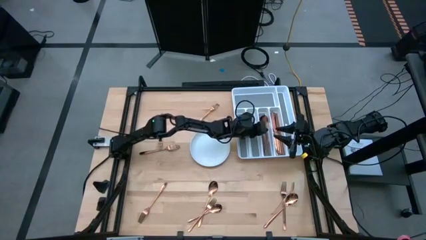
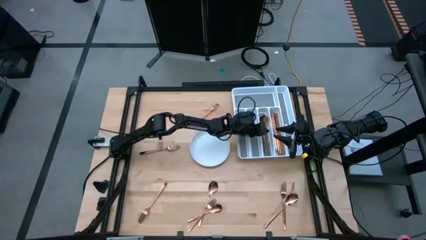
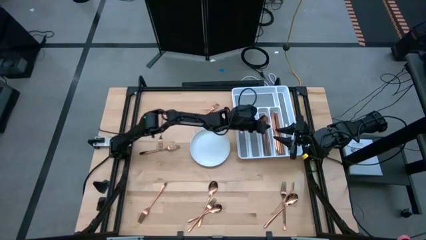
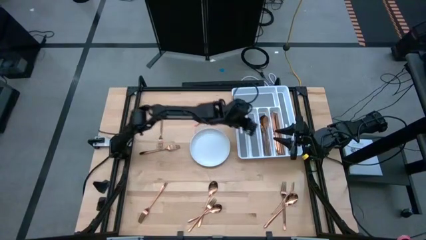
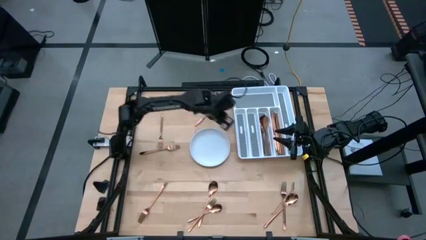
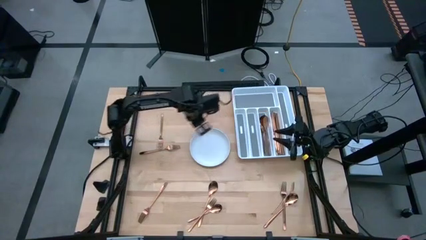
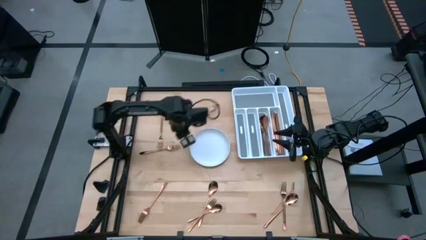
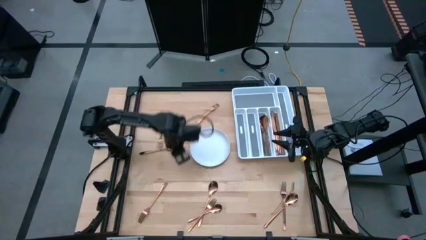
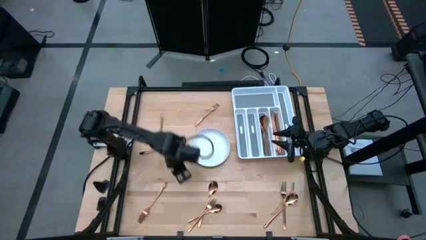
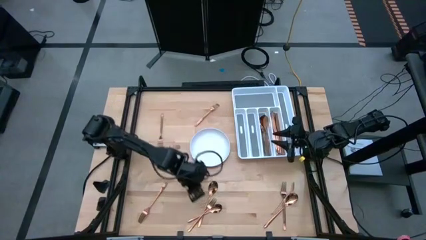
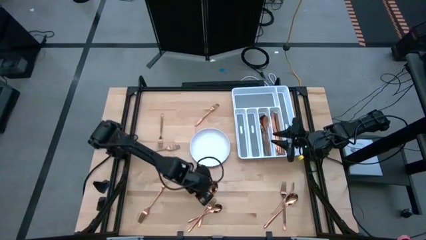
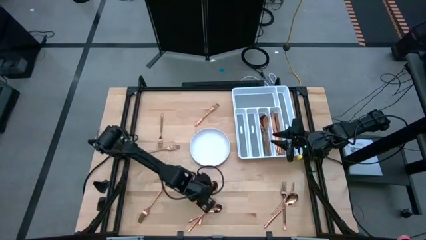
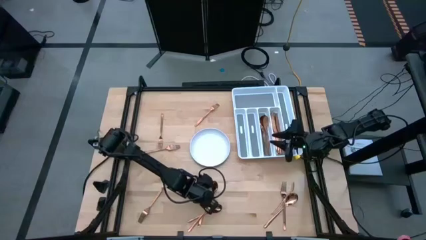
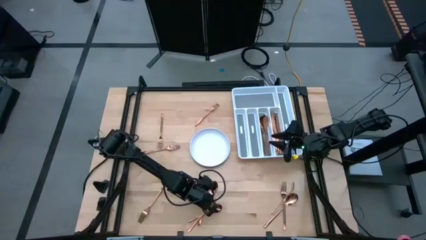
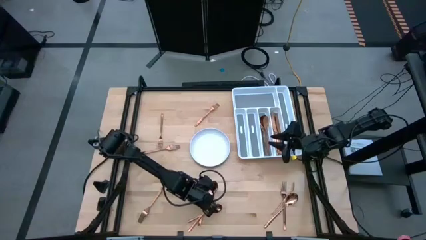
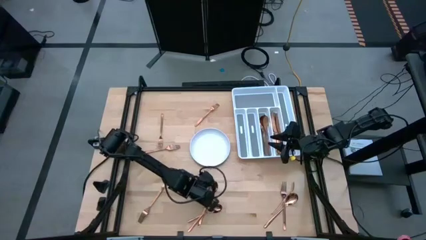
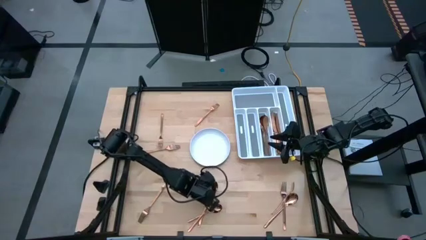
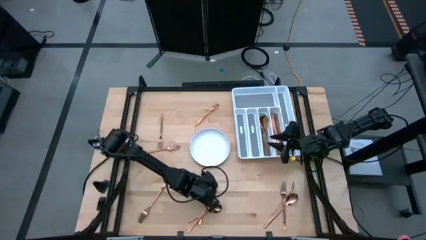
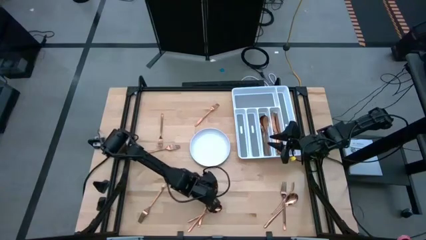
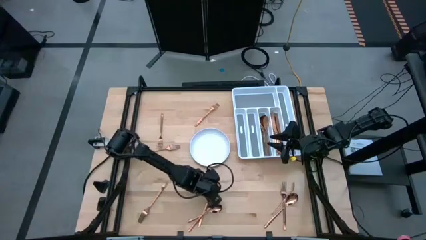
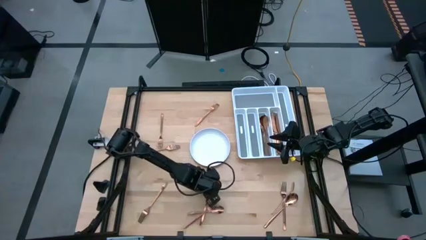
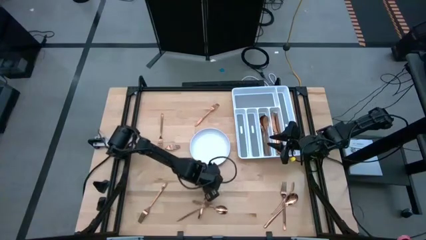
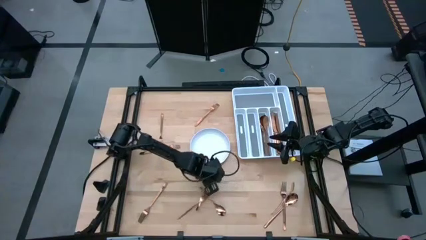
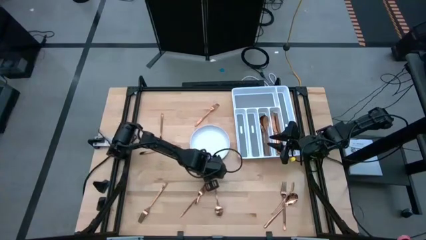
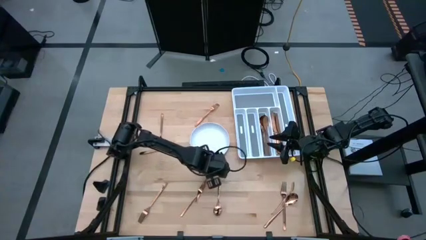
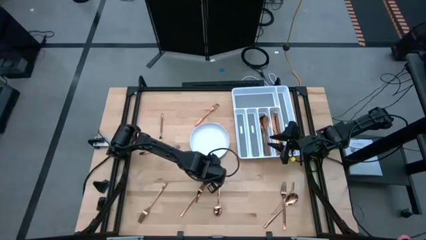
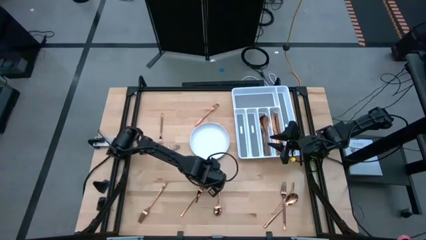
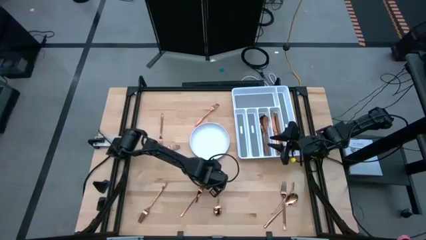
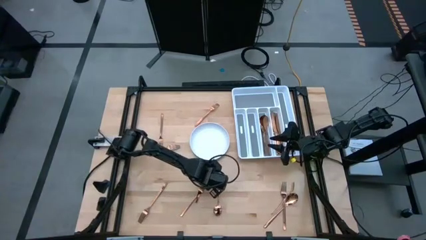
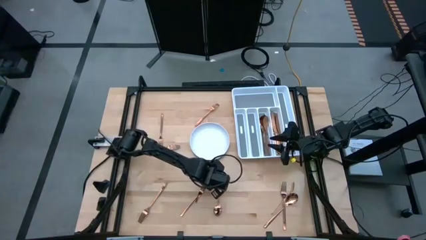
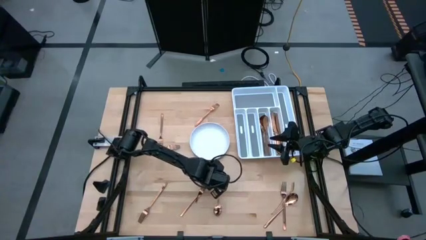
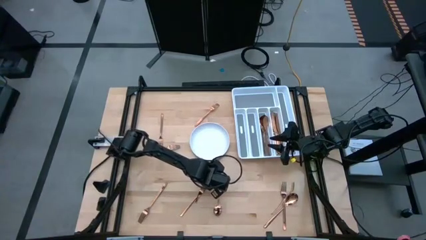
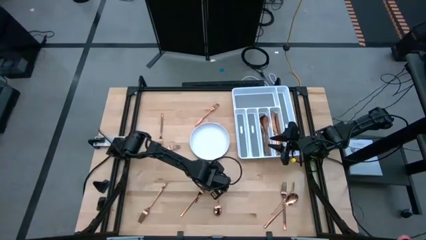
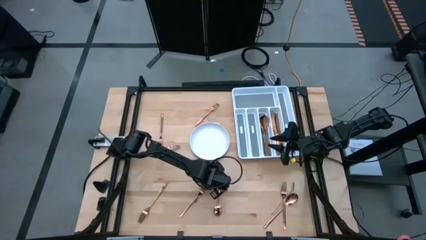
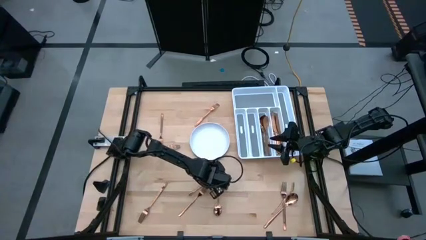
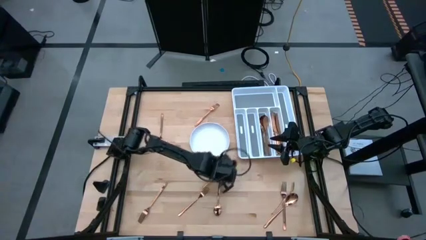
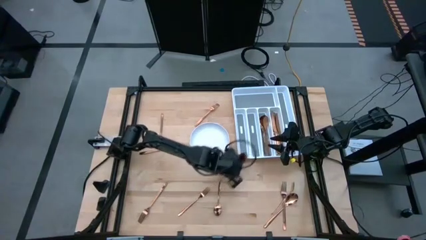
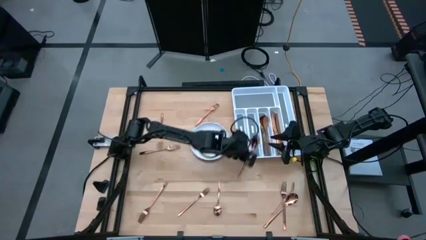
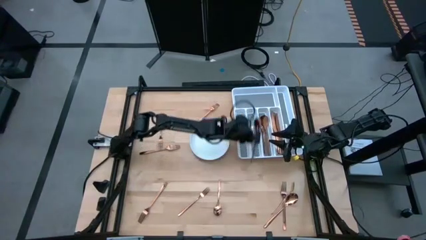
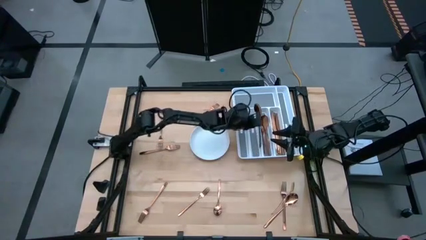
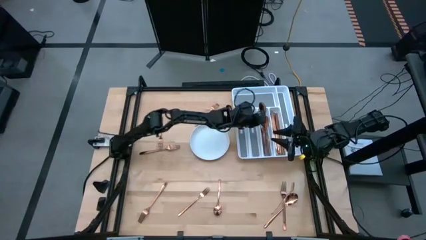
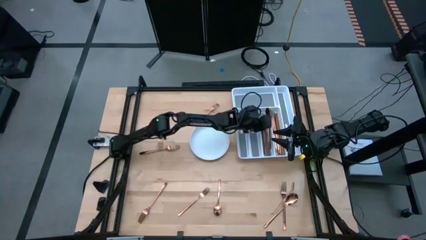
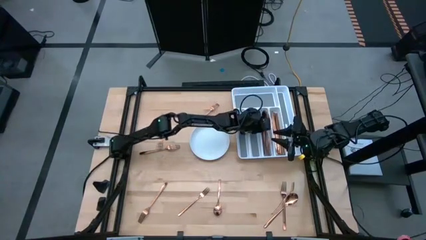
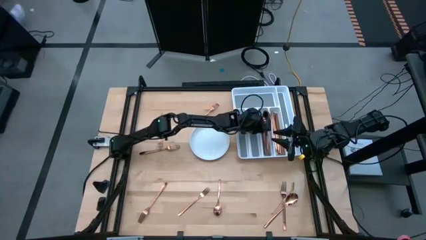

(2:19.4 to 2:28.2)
Task: Sort silverware
Put the spoon in the silverware tray

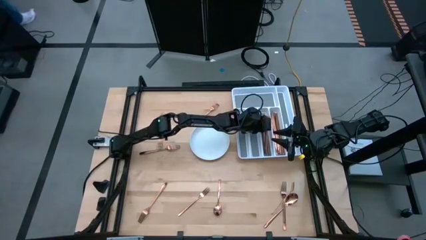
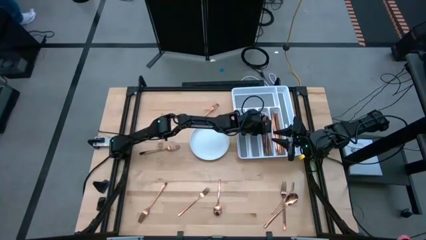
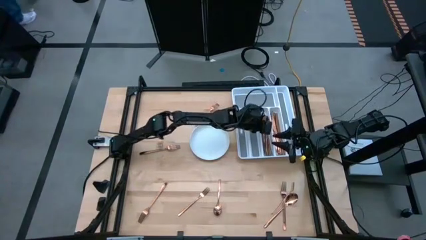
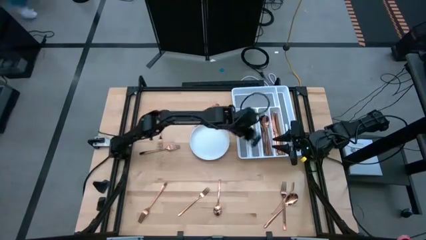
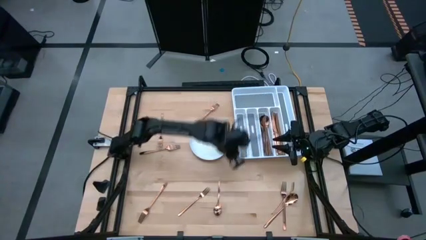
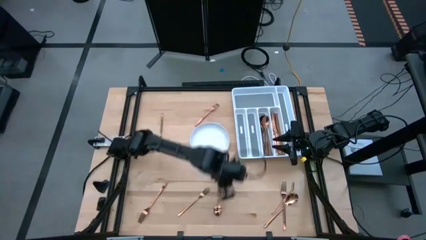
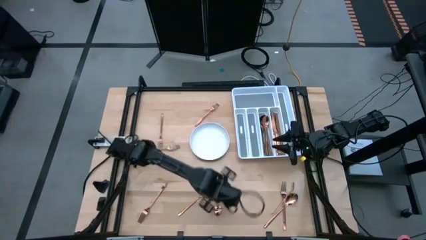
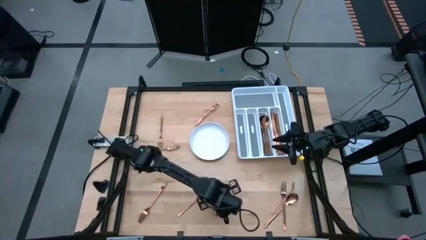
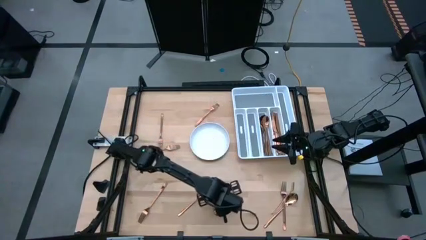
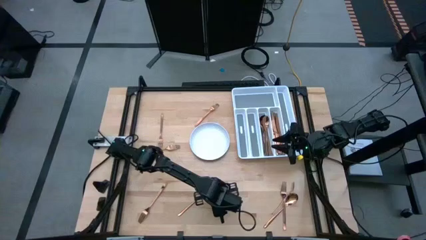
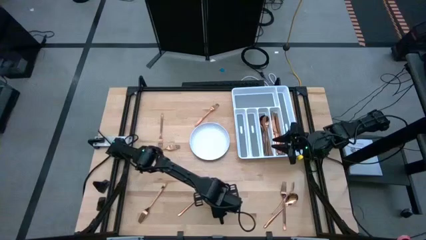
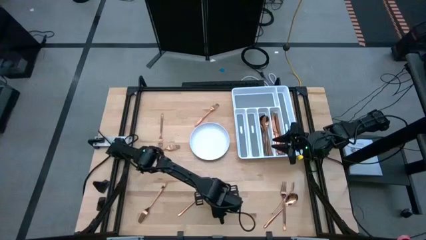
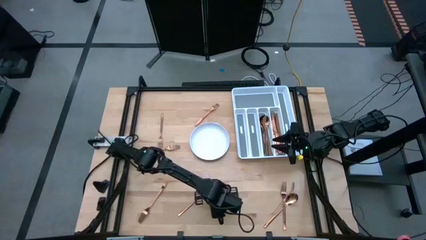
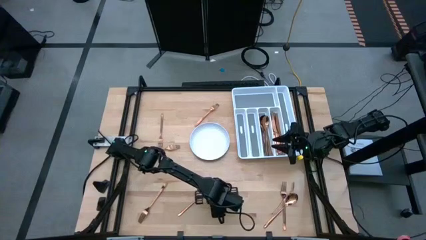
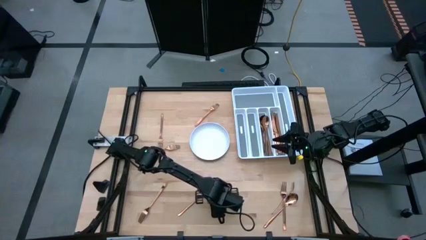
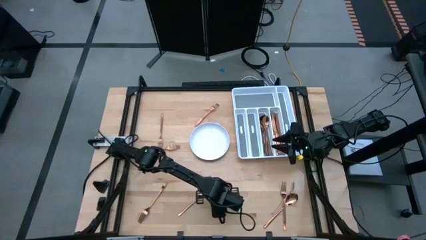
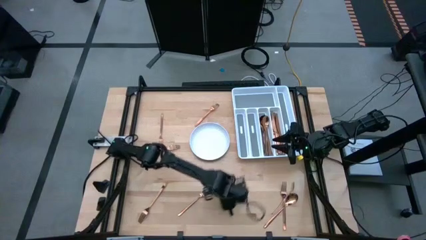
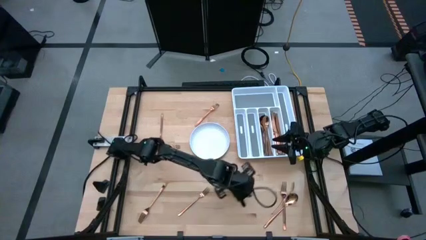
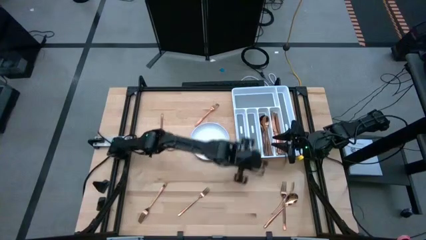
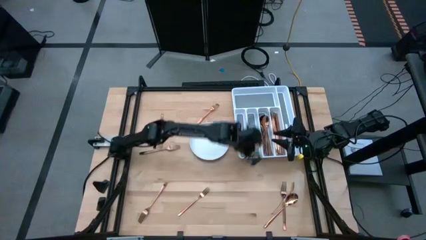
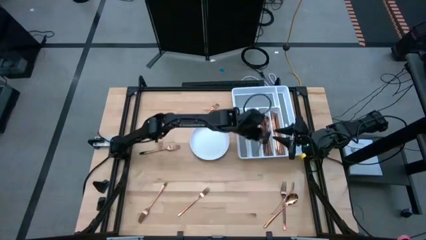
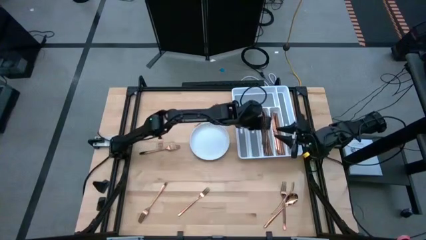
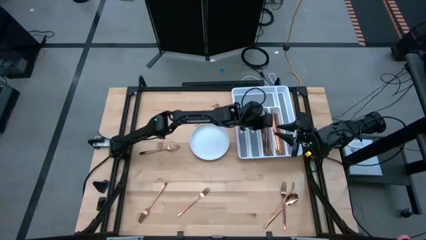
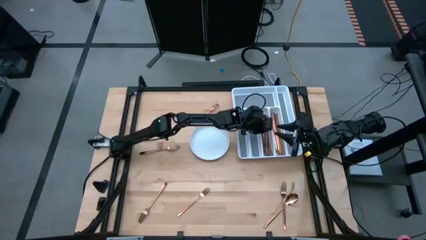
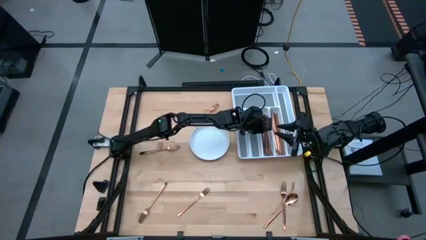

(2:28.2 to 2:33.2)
Put the spoon in the silverware tray

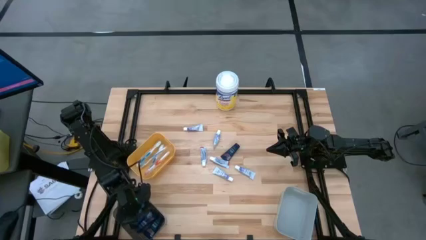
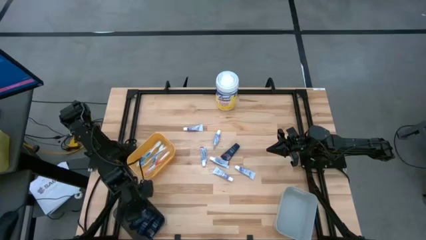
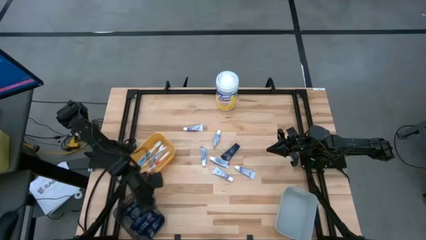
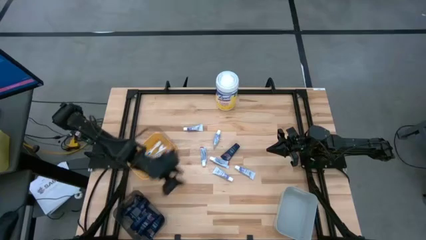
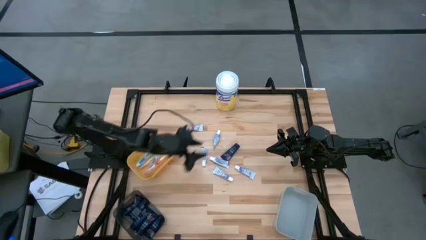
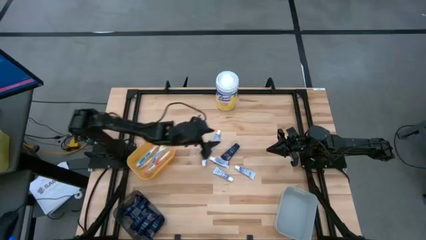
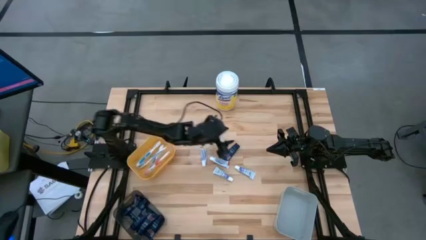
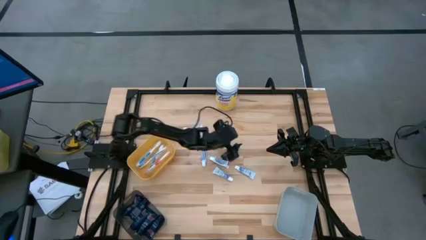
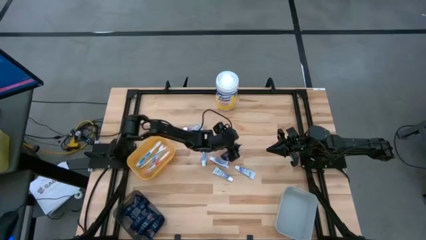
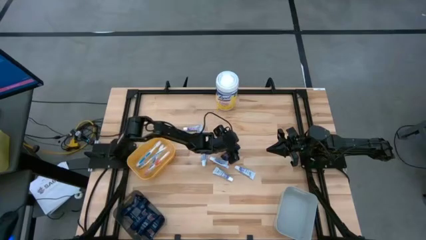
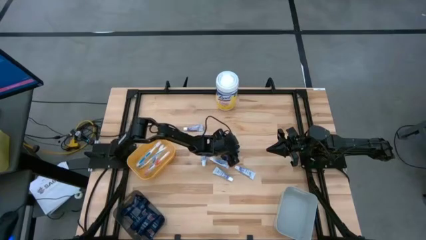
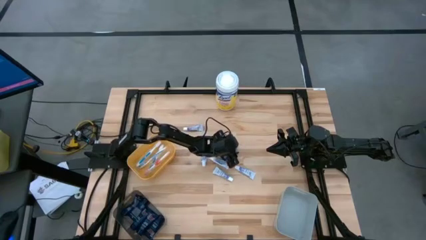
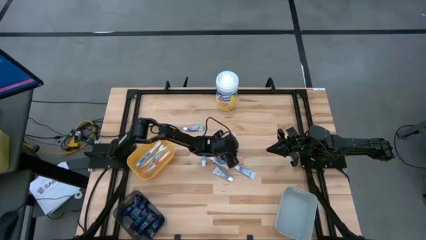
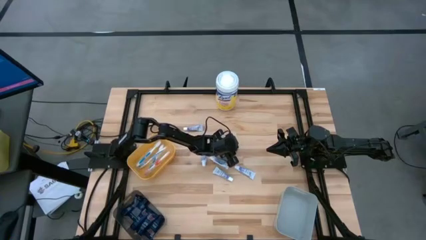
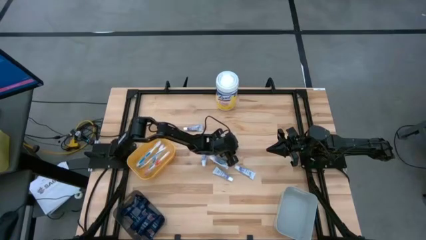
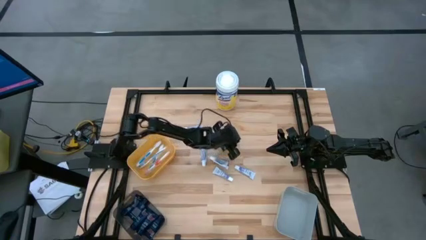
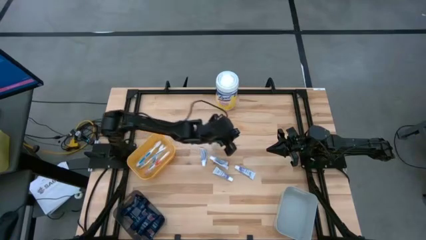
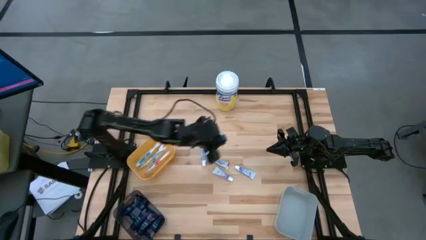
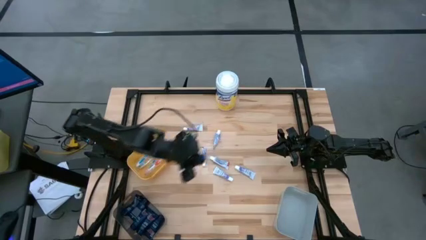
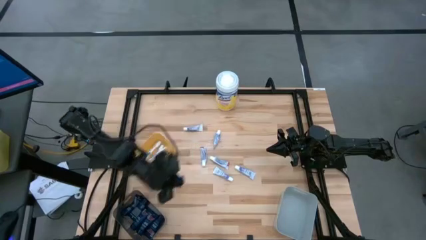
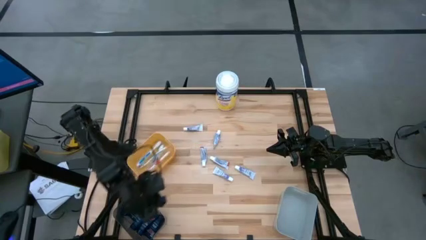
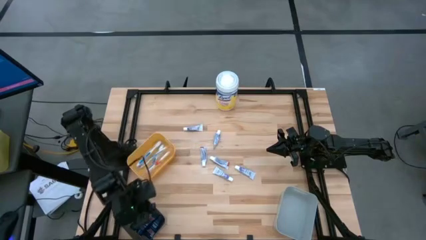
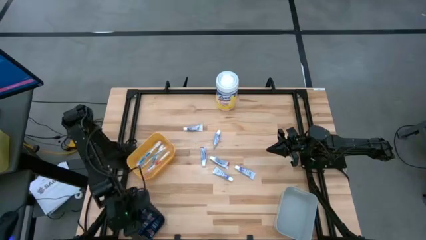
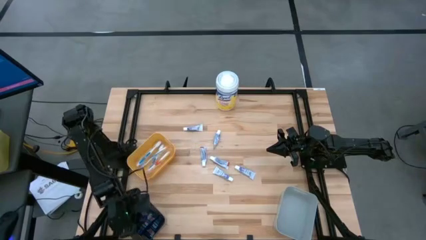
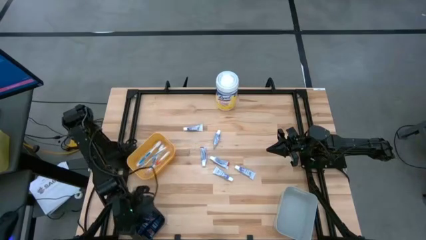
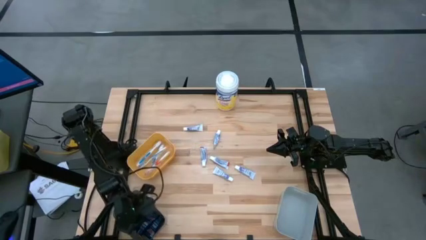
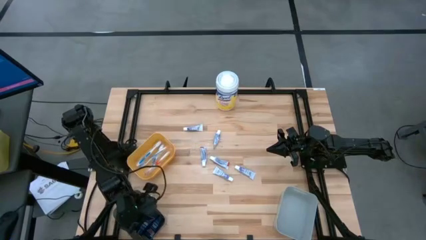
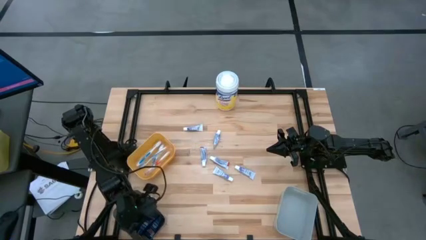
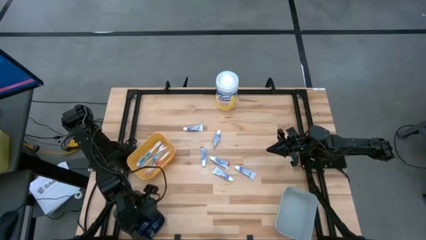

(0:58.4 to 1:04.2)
Task: Pick & Place Travel size toiletries
Put the blue shave cream into the black transparent bin
